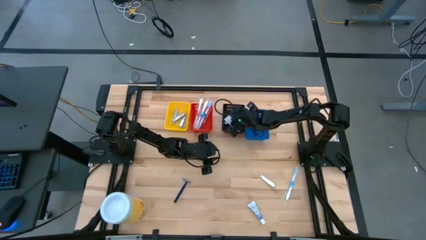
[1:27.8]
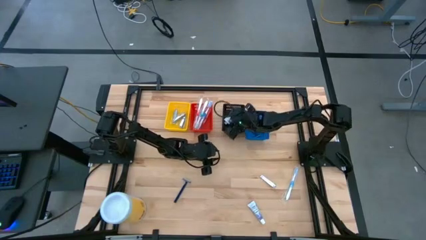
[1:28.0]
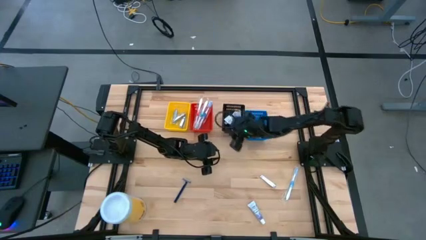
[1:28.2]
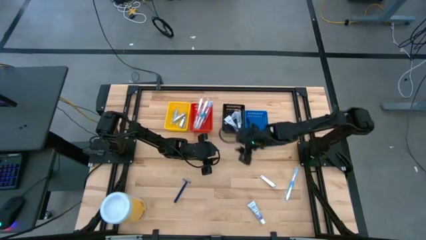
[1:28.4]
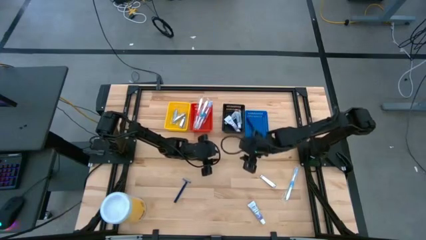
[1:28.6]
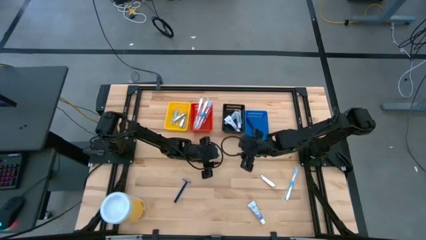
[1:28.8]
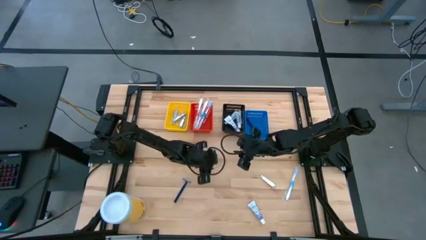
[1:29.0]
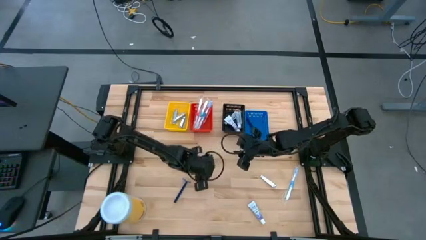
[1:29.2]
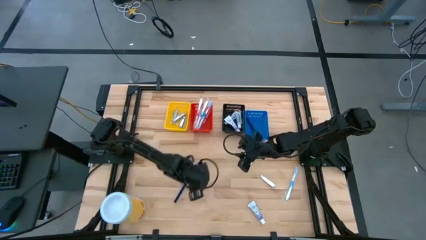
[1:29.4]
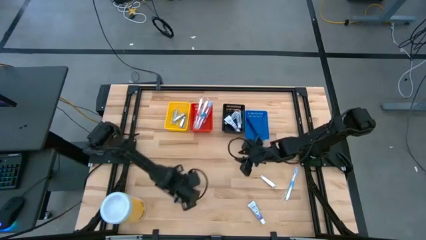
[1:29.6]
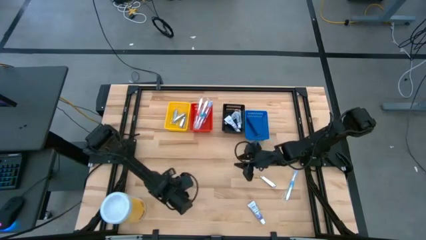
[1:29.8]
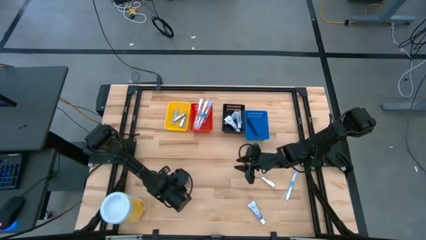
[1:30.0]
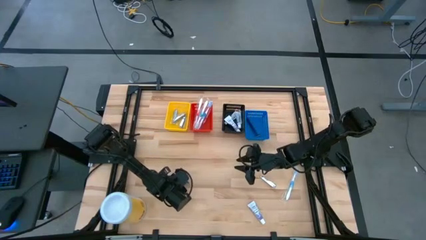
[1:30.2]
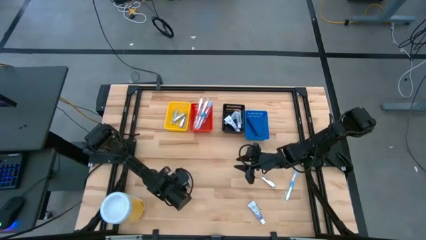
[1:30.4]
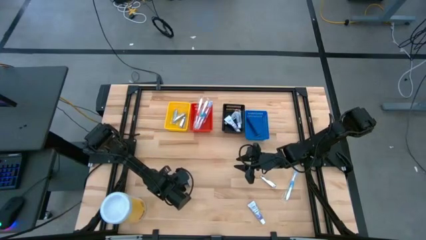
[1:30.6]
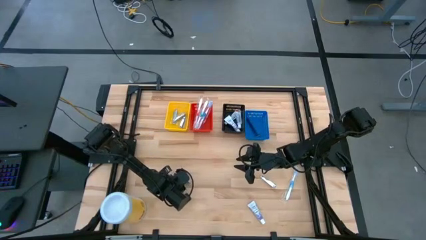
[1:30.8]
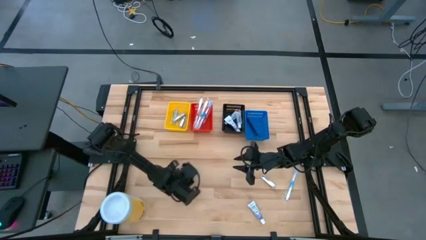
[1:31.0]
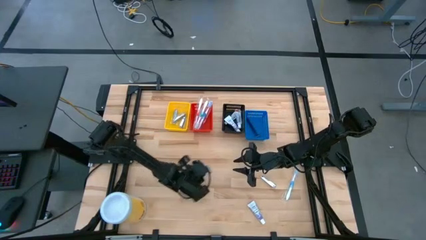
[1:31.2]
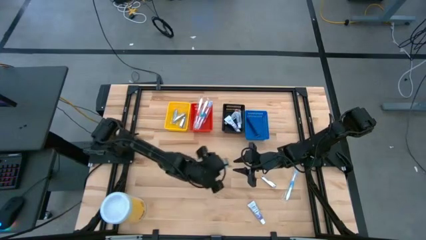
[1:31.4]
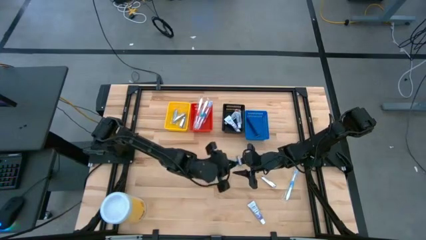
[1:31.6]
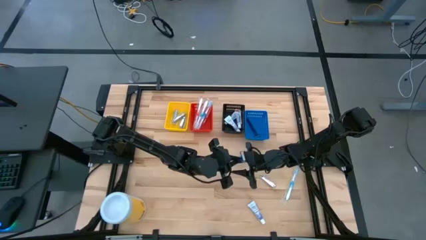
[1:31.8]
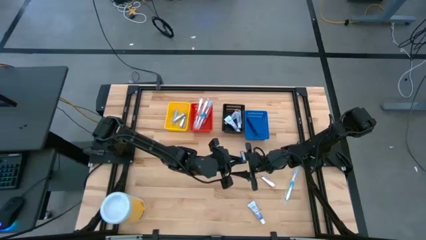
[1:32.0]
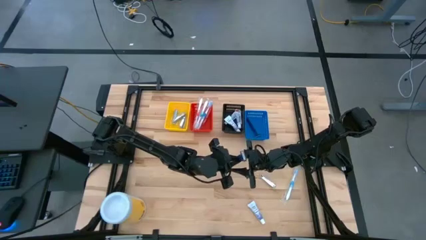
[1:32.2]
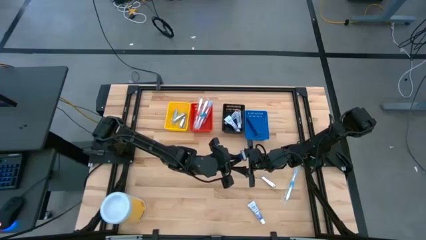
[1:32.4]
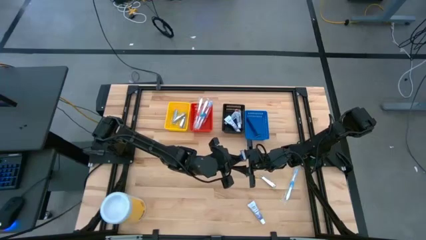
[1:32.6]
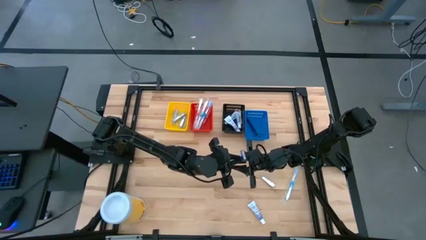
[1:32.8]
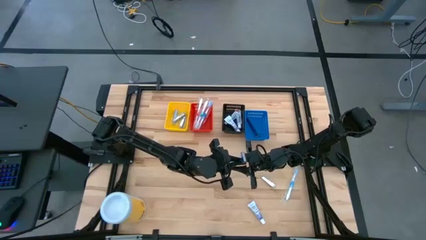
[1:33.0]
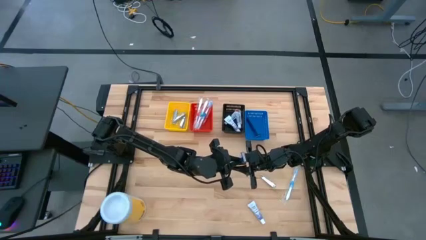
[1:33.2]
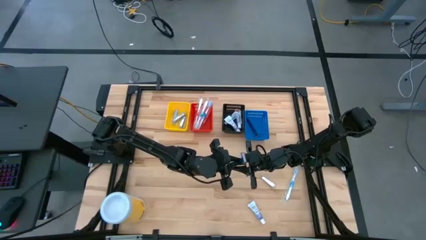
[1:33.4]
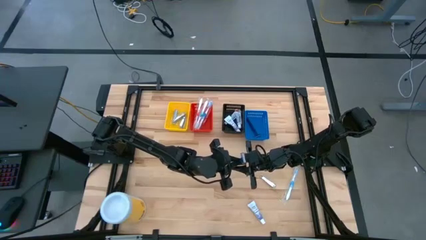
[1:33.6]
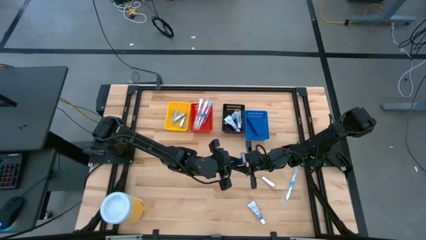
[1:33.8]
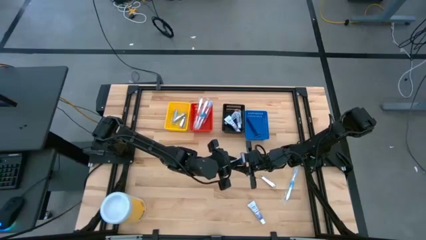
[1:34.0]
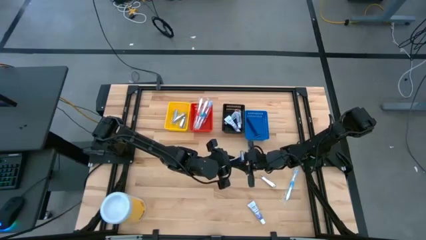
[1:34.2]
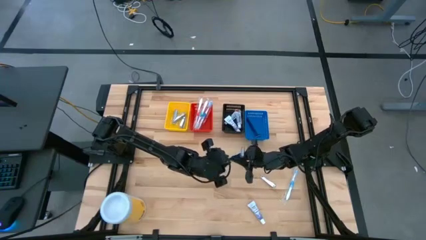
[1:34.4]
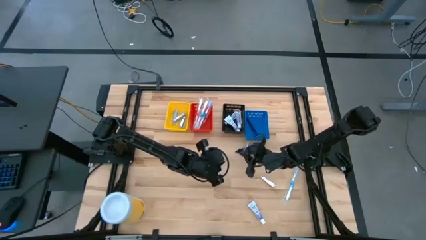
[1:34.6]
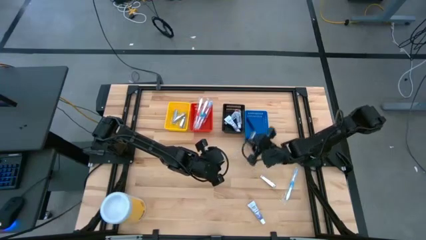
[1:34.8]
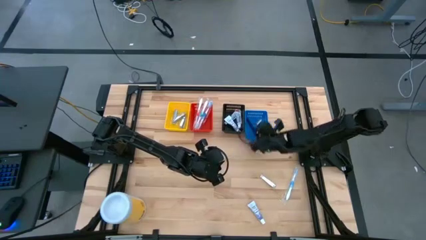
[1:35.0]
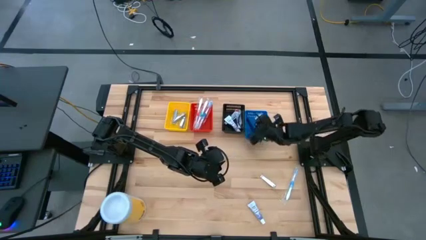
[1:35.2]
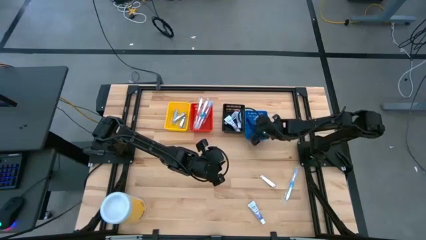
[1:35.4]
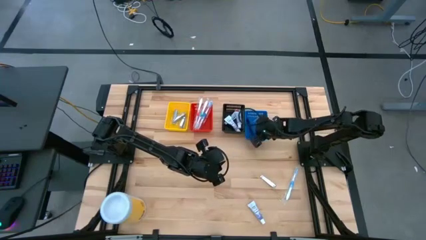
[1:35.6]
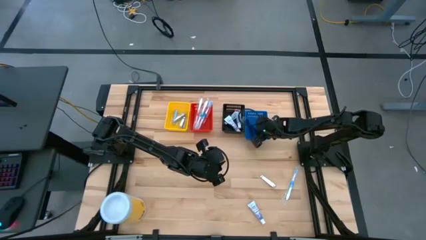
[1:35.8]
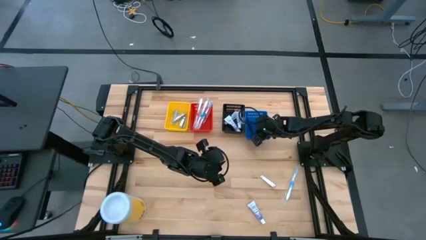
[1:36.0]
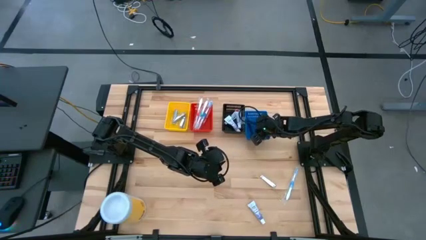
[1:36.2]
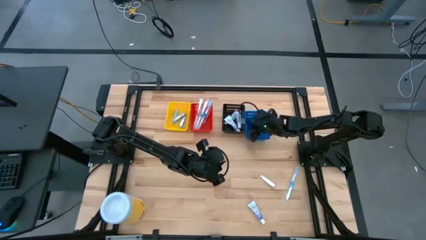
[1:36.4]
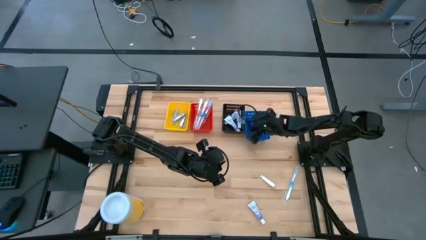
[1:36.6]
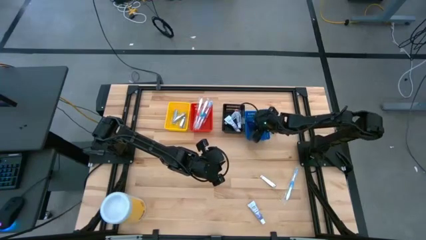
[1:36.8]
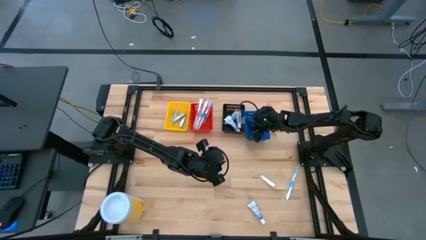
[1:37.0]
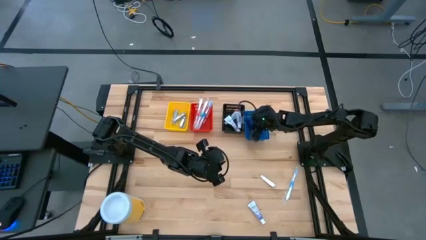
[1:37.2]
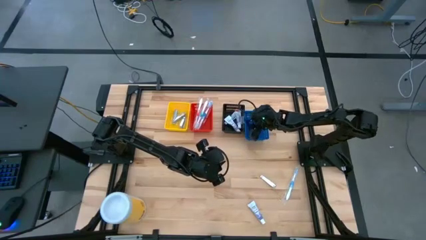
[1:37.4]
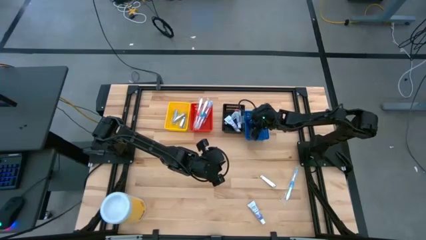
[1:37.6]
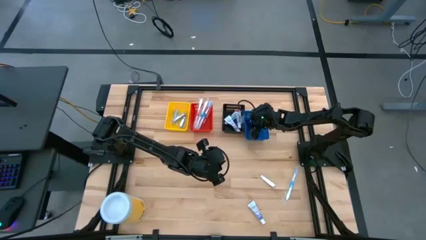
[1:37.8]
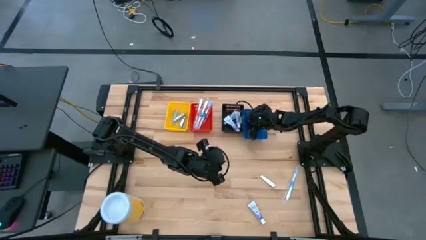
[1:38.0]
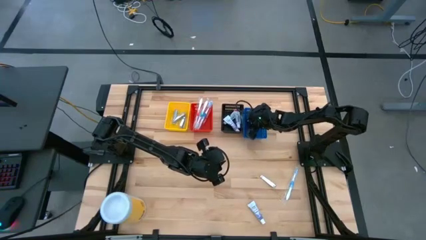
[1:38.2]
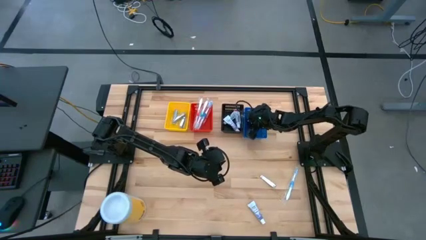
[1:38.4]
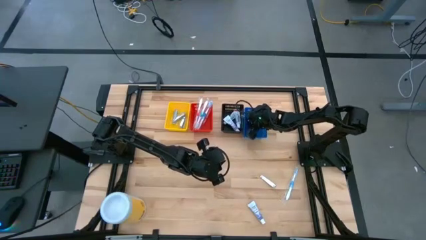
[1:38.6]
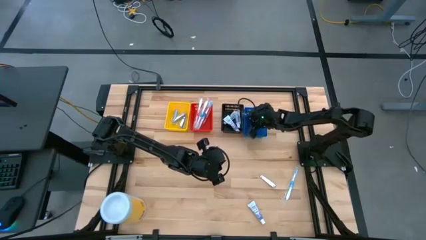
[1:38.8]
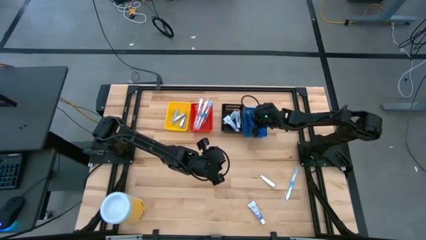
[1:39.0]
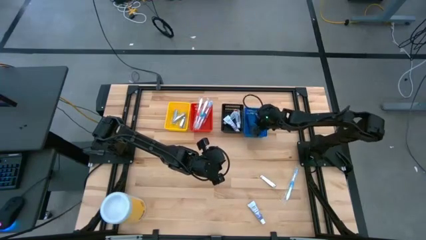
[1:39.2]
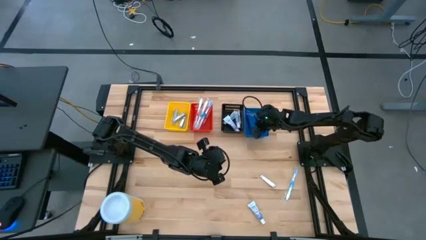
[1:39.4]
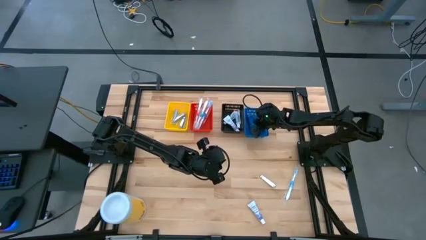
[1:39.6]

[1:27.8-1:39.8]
Task: Pick & Place Travel size toiletries
Put the blue razor into the blue bin

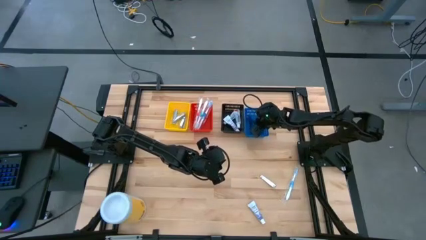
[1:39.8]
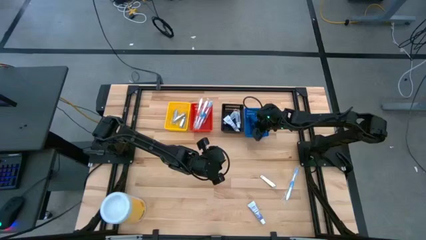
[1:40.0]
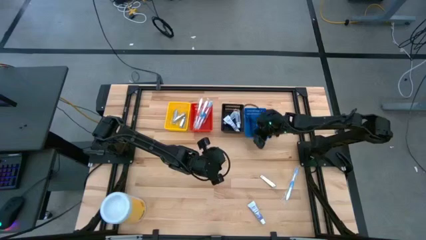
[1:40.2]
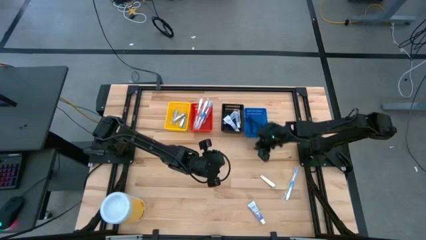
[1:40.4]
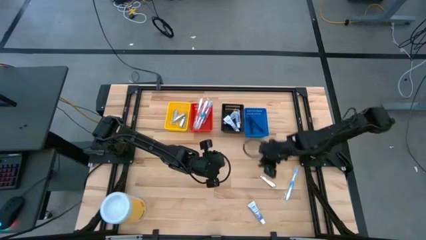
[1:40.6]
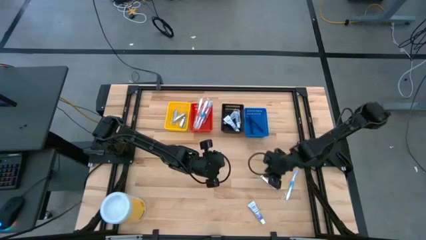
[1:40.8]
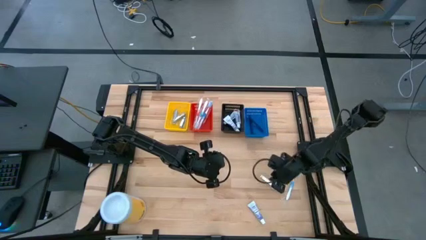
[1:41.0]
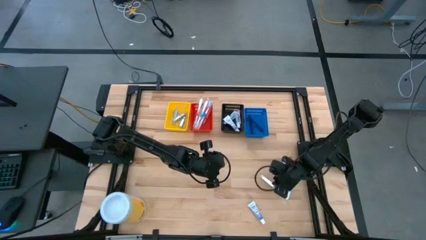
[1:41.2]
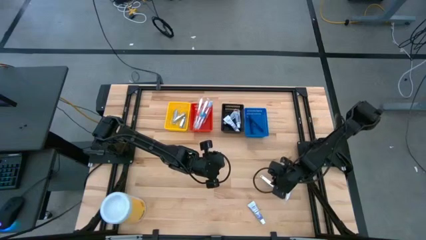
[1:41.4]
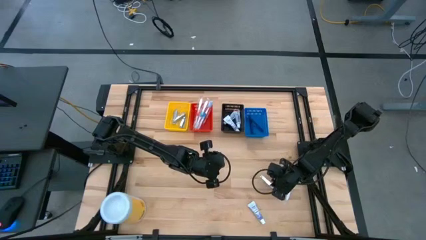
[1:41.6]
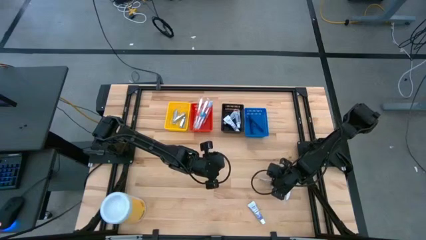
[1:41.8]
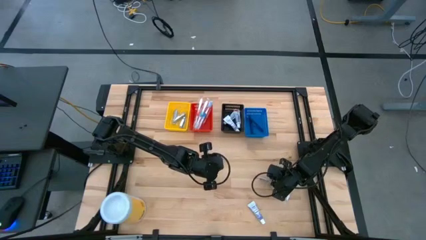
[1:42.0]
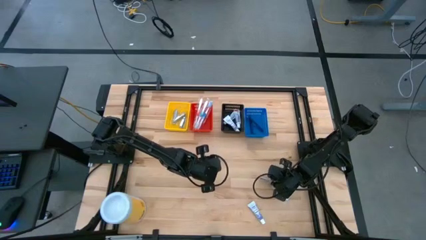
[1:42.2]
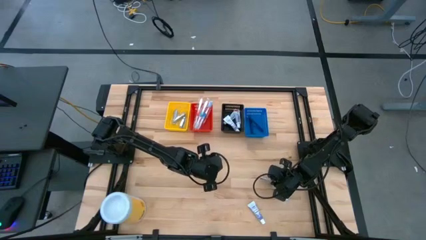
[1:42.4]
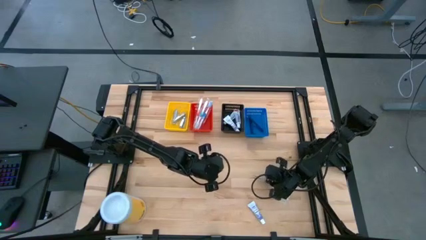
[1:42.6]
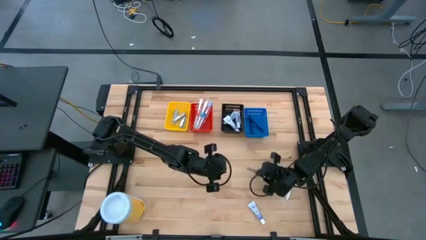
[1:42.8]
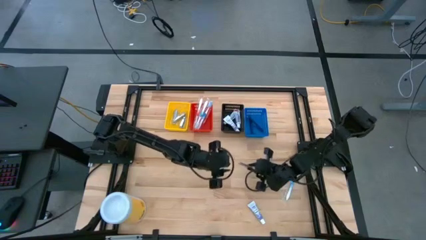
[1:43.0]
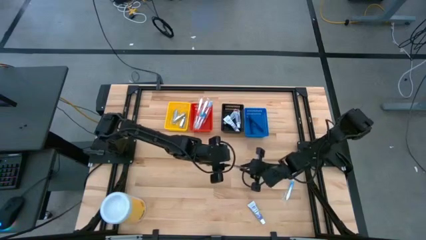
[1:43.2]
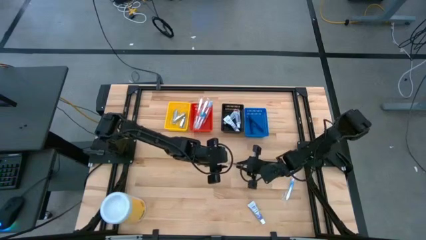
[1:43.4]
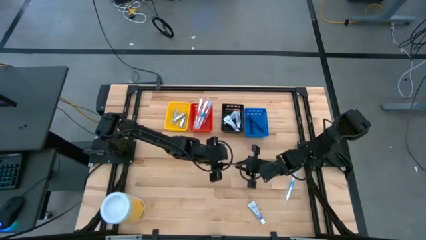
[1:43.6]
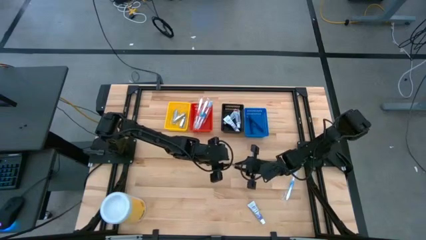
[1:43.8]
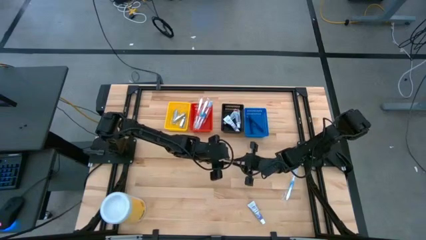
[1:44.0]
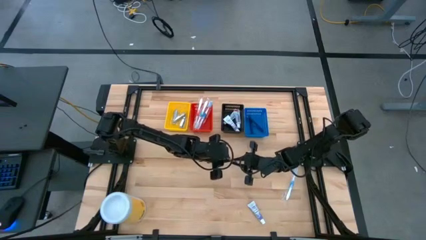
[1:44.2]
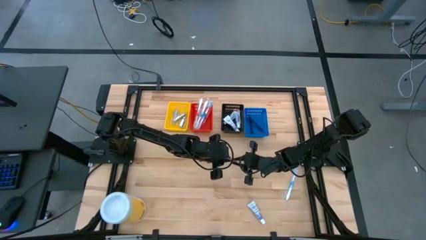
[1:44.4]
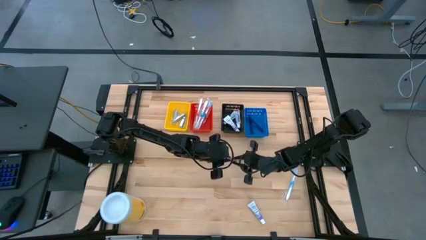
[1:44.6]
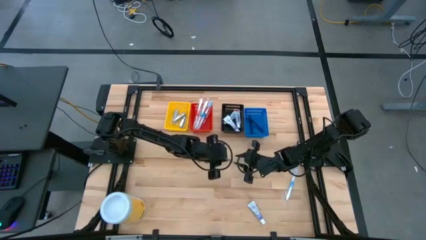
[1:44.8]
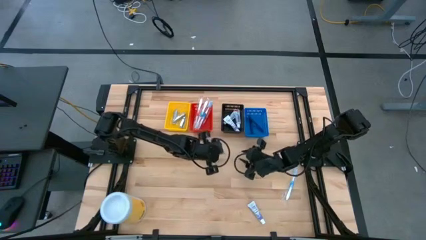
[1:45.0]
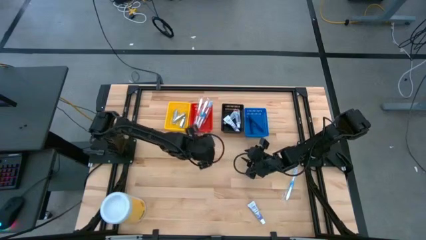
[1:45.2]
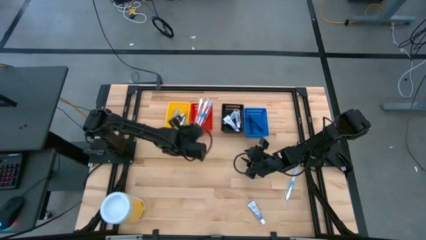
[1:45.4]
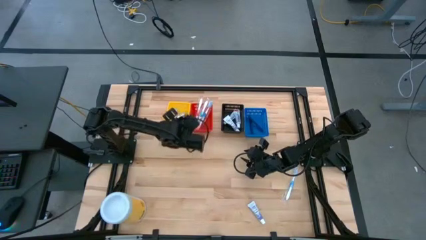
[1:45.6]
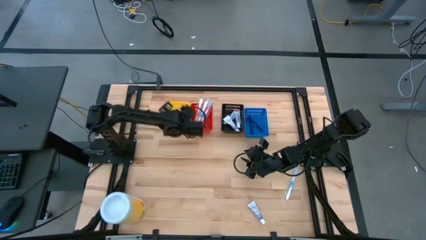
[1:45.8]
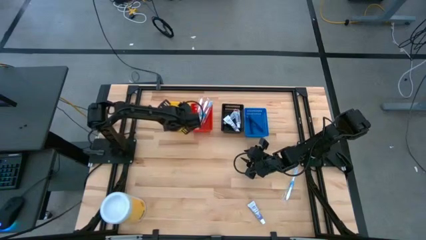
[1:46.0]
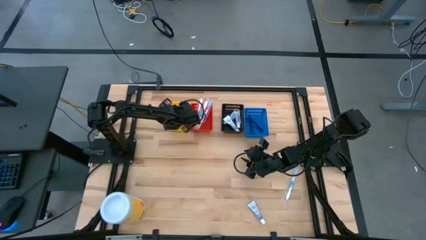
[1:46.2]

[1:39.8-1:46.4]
Put the silver nail cutter into the yellow bin
